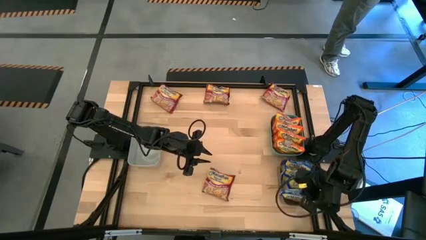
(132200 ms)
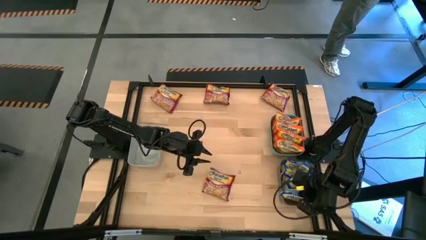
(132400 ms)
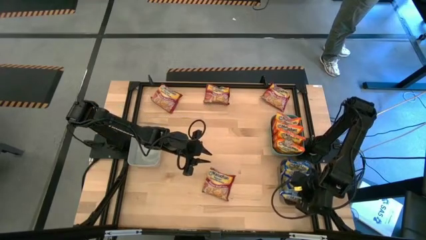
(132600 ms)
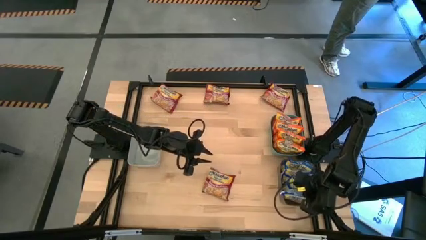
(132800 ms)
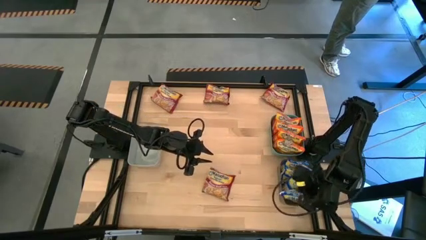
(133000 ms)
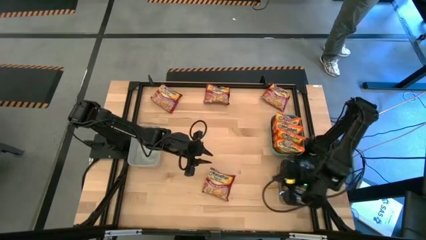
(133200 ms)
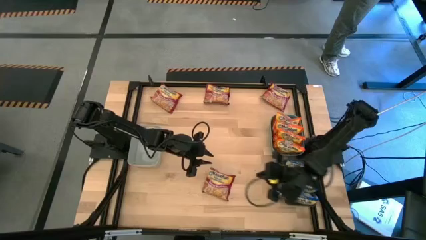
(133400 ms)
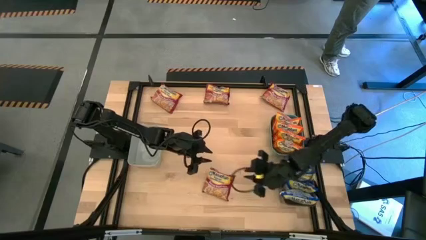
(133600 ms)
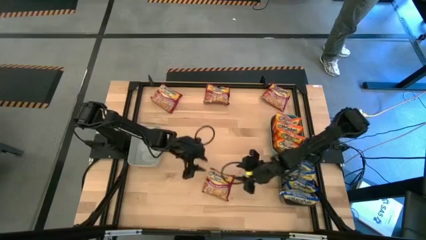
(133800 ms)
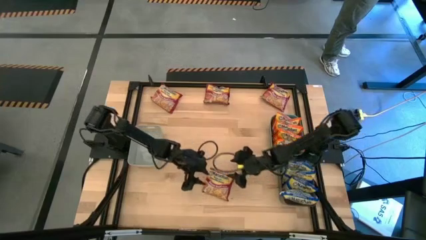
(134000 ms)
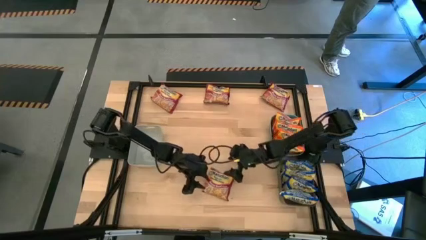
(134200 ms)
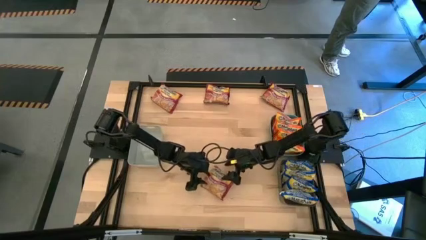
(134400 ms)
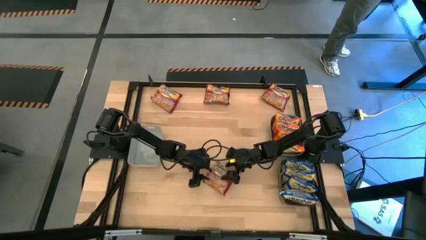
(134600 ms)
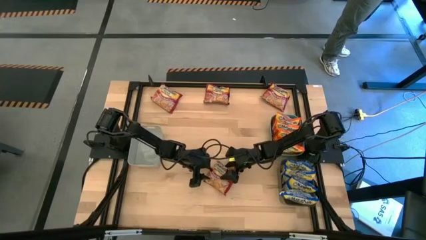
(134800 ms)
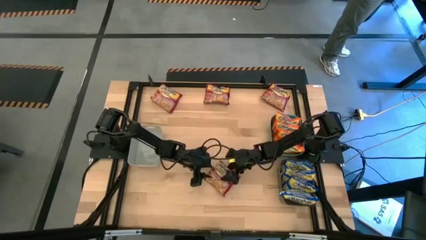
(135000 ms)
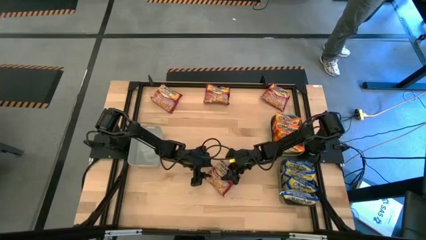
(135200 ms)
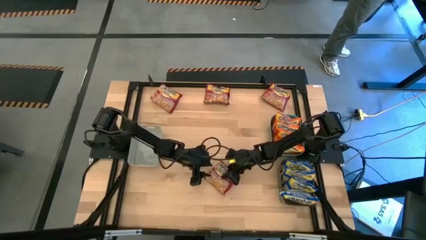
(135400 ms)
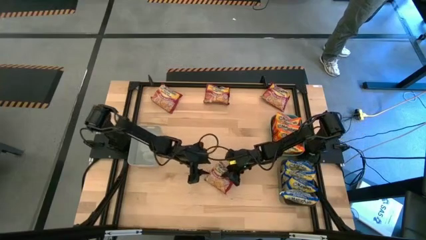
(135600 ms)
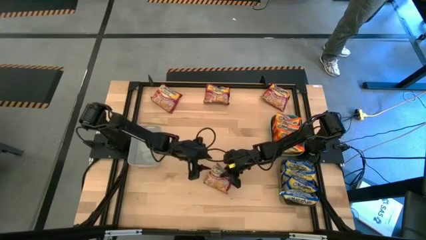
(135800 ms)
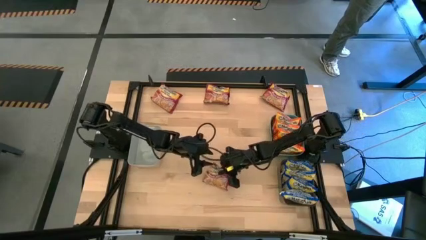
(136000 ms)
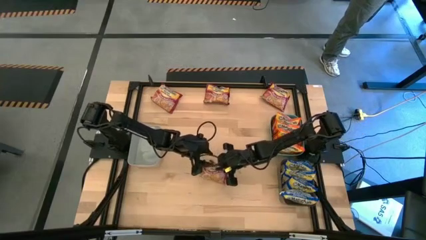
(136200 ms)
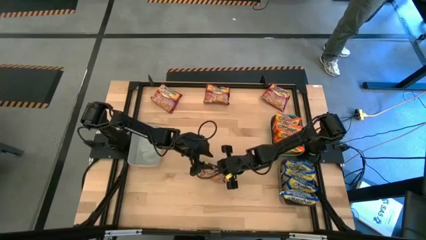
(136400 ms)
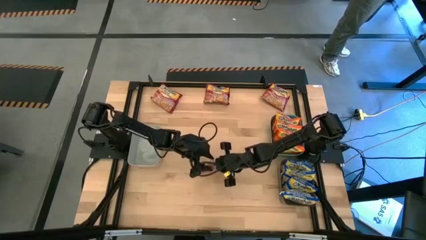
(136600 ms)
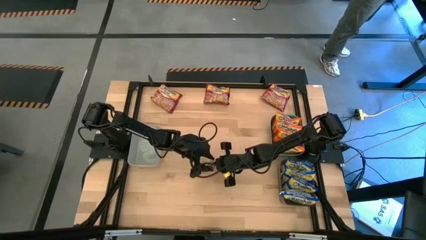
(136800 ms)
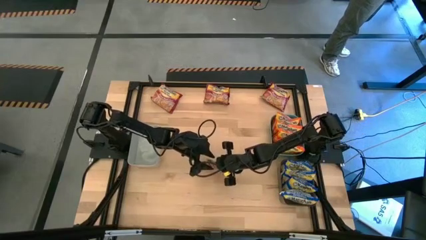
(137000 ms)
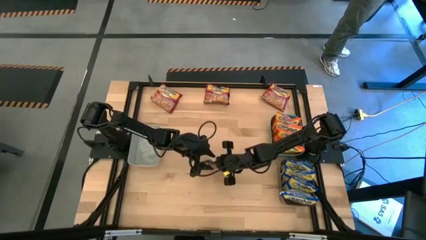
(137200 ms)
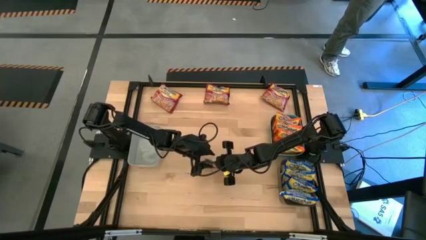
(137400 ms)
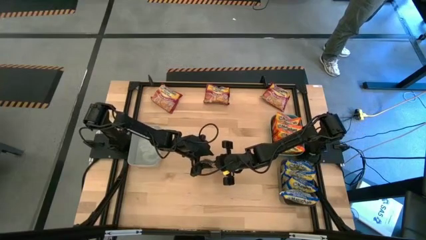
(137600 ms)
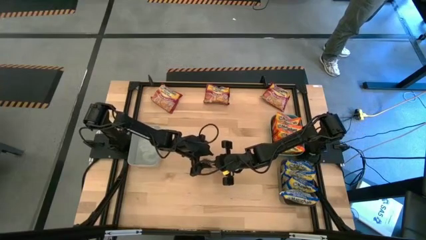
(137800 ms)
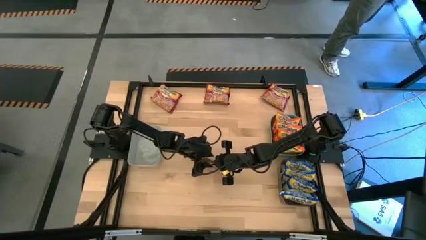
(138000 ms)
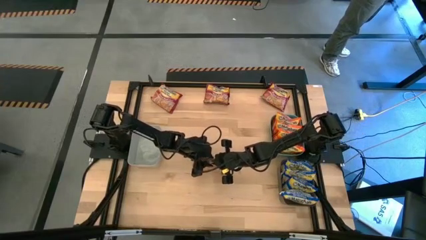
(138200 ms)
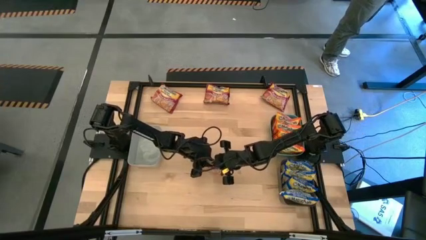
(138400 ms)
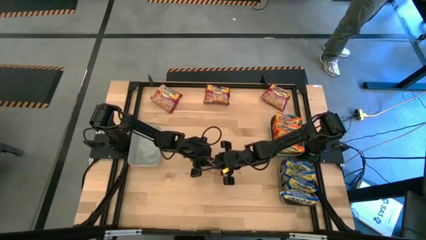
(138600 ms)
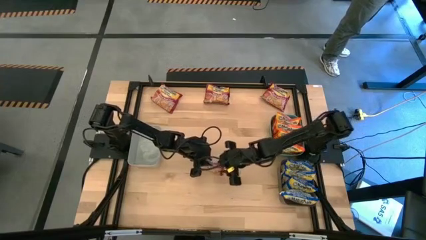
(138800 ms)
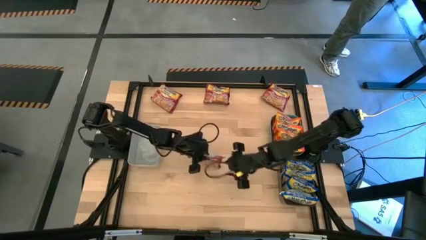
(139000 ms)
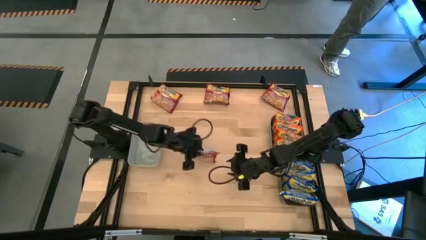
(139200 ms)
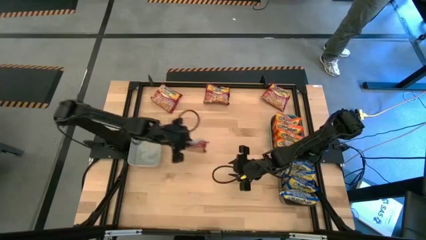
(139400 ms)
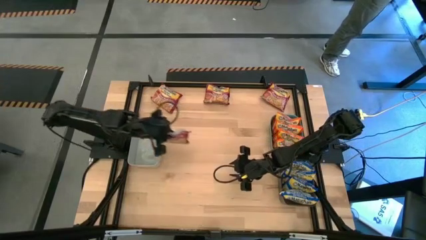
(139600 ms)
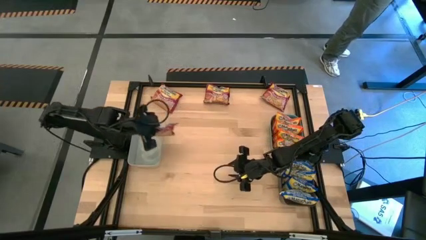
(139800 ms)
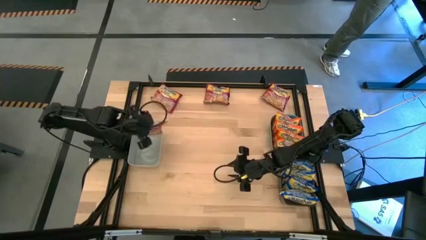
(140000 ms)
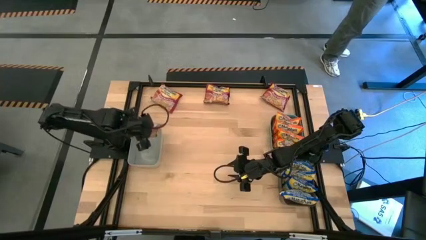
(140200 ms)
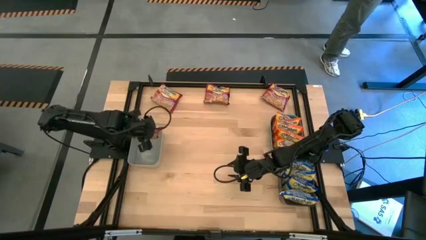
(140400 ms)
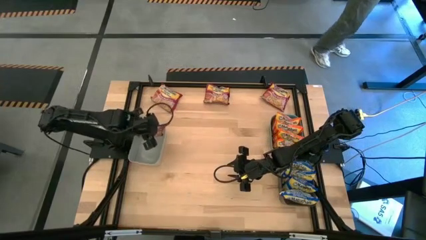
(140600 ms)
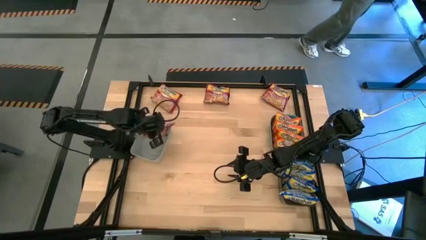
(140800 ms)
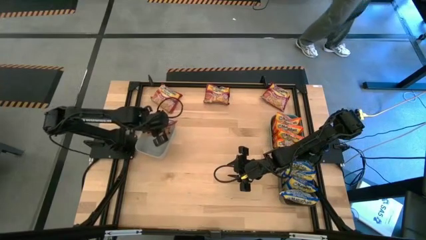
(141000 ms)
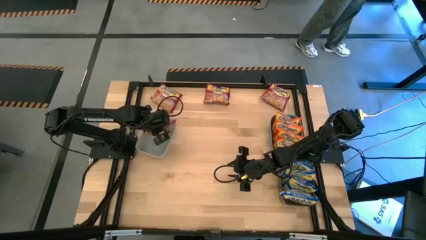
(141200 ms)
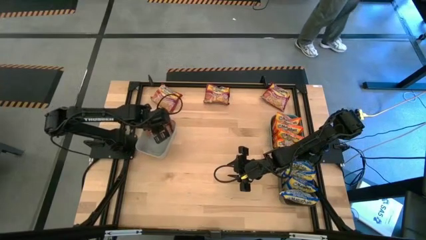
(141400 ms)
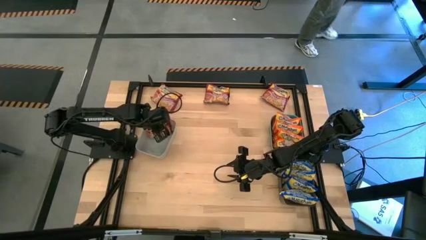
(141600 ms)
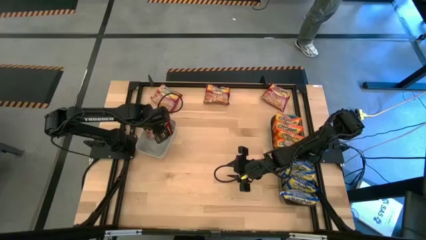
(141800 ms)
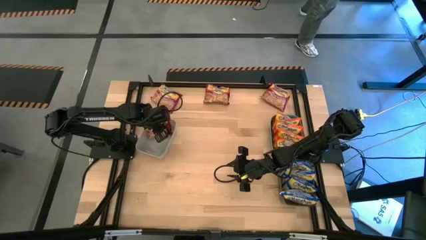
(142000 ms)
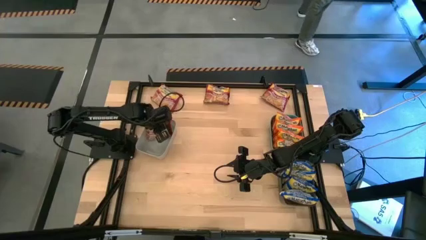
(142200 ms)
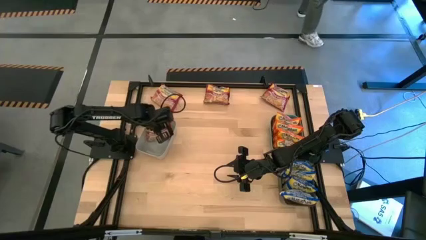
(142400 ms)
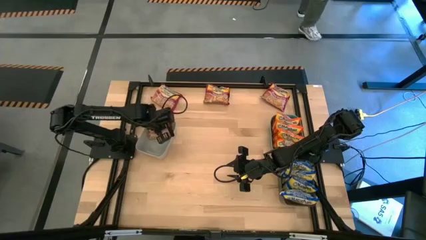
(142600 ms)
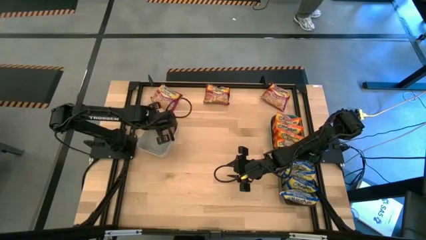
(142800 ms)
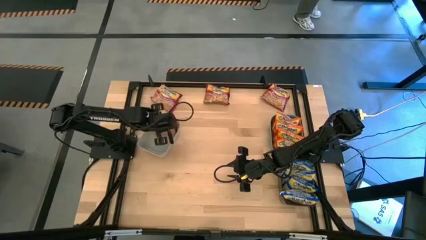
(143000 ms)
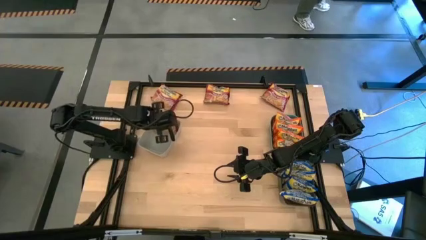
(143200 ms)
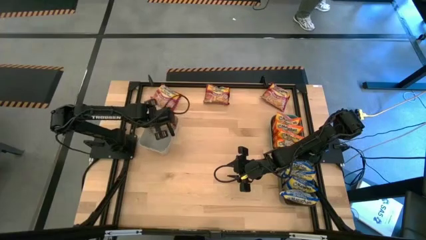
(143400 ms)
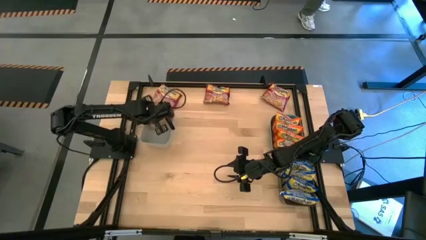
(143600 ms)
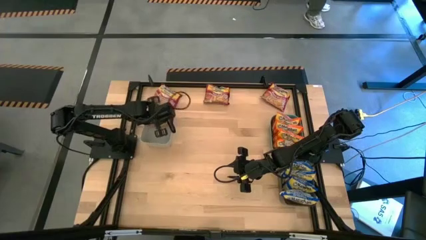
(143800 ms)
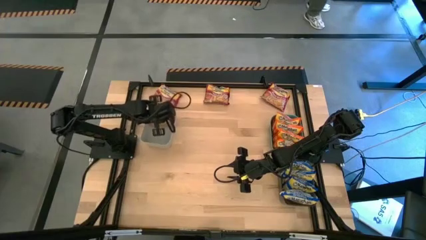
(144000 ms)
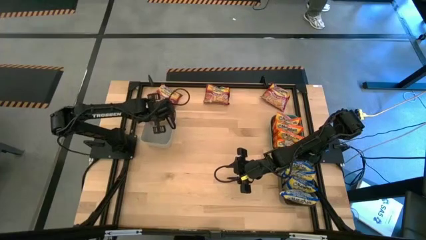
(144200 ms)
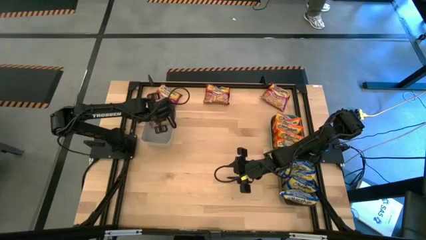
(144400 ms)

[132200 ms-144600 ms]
Task: Sort Maruchan noodles
Put the red noodle pack into the white bin

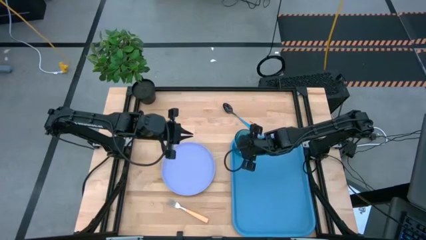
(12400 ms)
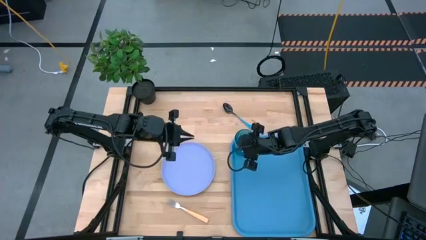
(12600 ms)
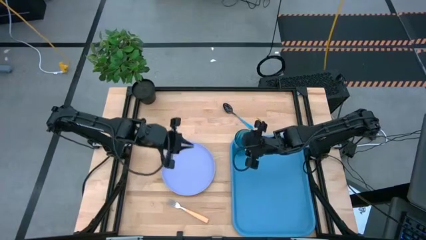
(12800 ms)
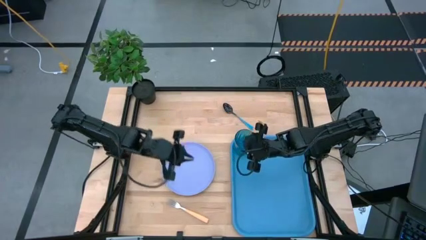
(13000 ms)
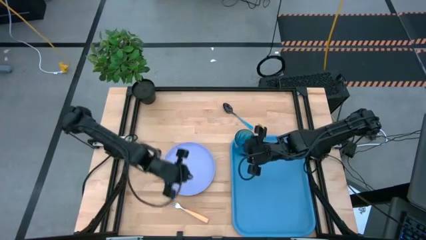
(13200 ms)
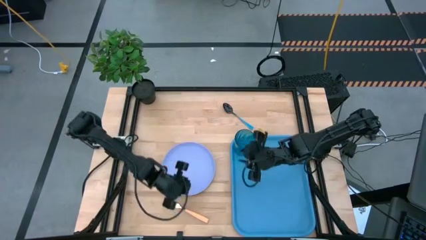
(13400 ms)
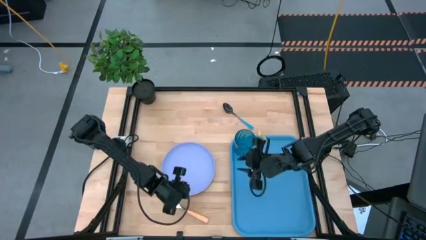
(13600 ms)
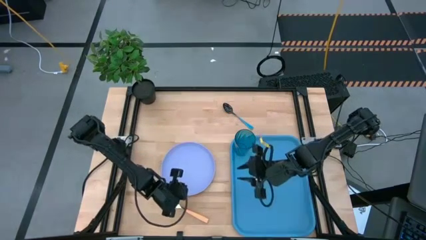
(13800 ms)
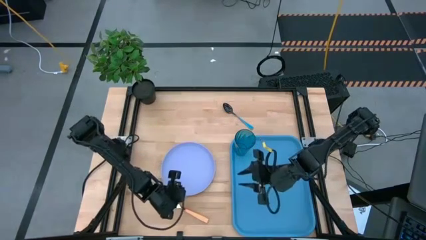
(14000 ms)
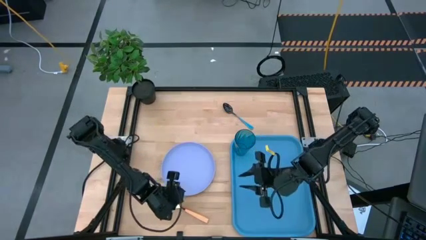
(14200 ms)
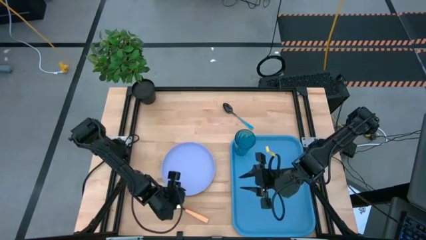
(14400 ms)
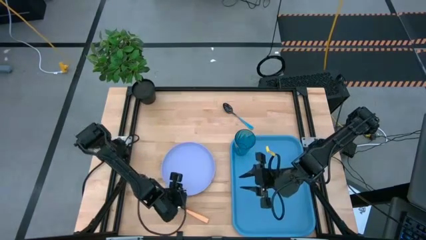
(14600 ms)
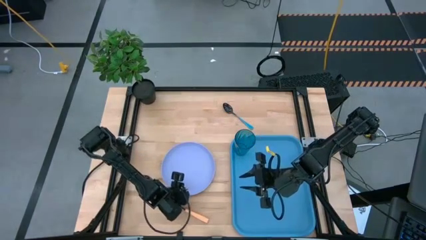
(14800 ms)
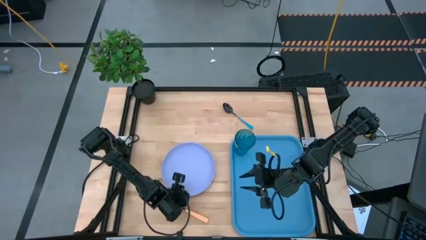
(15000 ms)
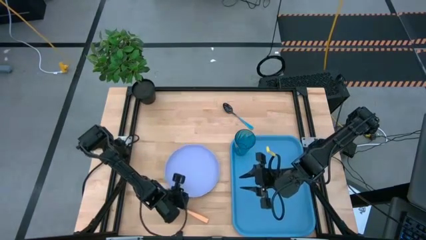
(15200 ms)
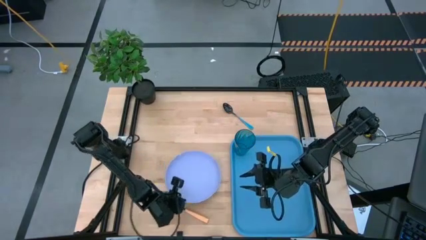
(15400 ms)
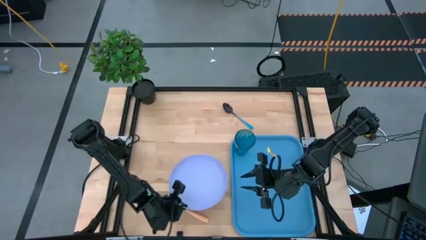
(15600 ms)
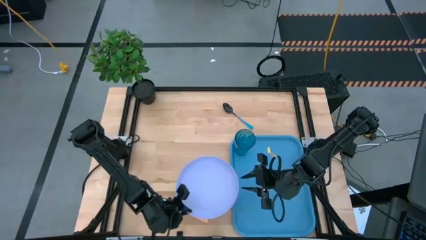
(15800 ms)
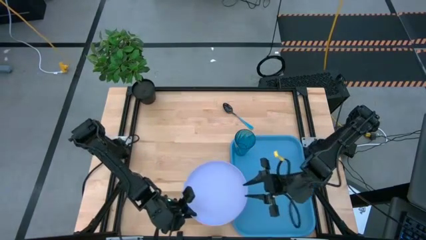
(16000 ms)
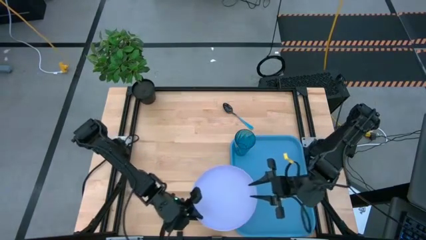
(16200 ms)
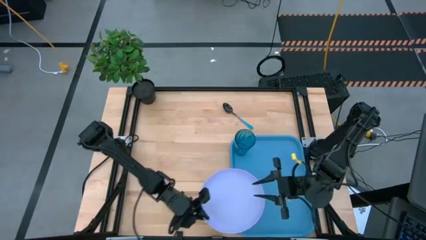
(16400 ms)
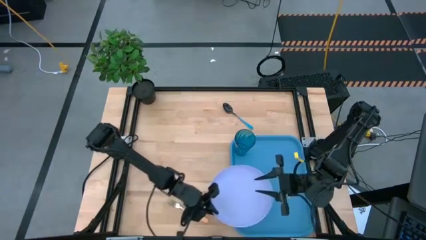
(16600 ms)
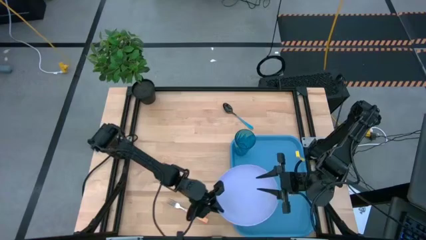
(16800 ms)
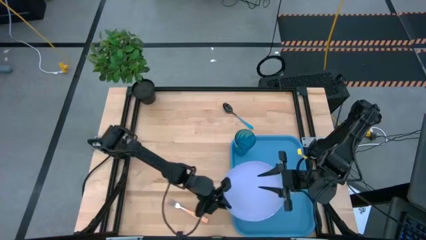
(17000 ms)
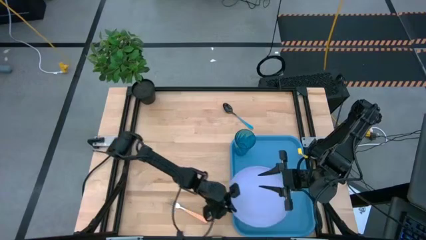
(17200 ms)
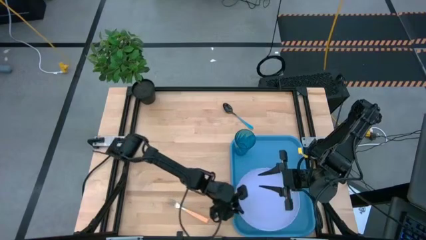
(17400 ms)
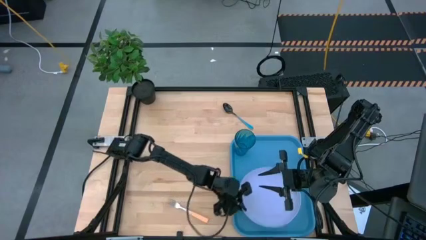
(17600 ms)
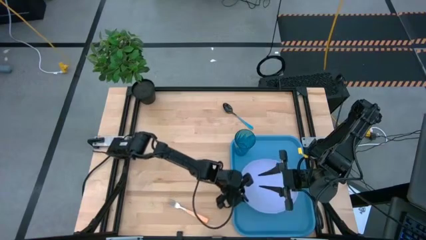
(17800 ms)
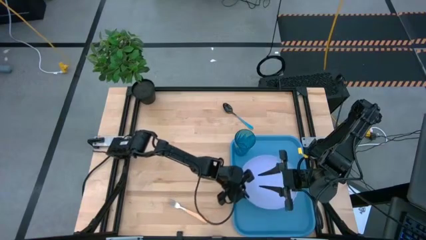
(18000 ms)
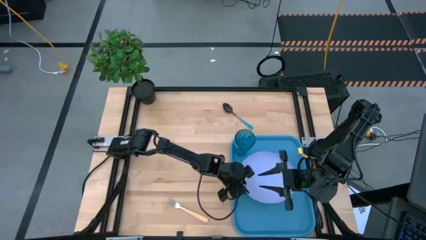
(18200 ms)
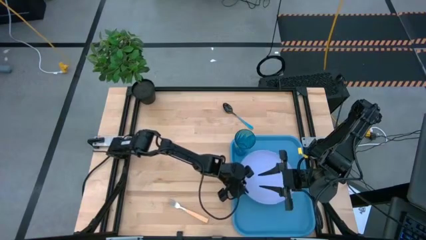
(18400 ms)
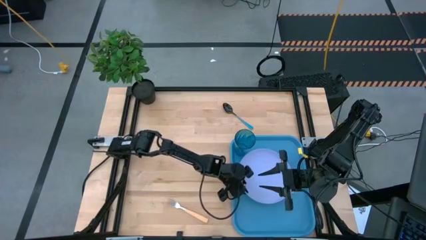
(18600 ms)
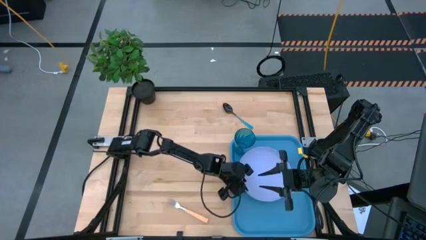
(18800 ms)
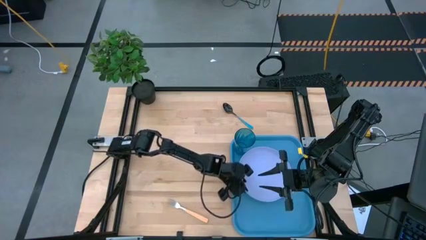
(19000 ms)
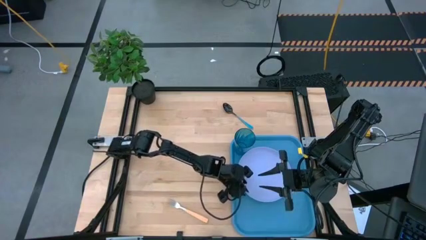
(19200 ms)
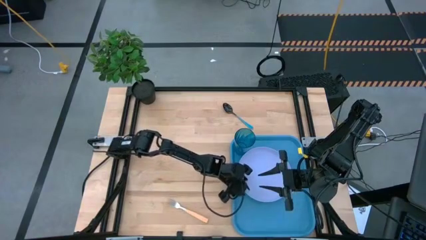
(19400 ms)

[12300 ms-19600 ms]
Task: Pick and place plate/cup/fork/spoon on tray
Put the purple plate on the blue tray at the left side of the blue cup
